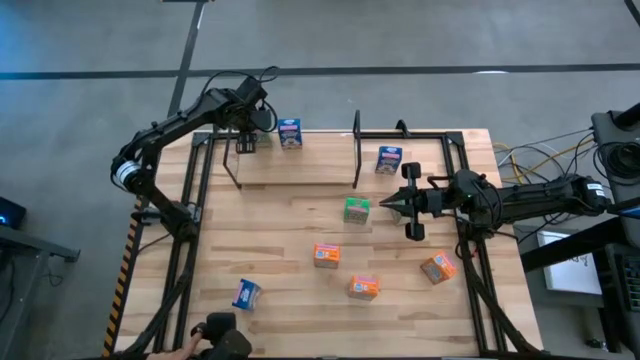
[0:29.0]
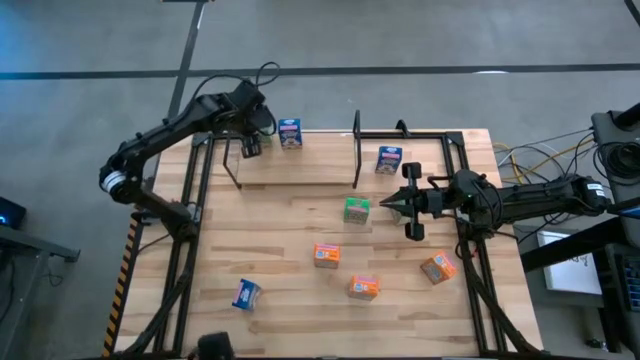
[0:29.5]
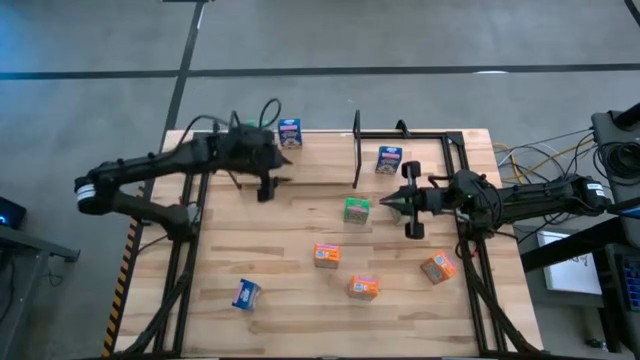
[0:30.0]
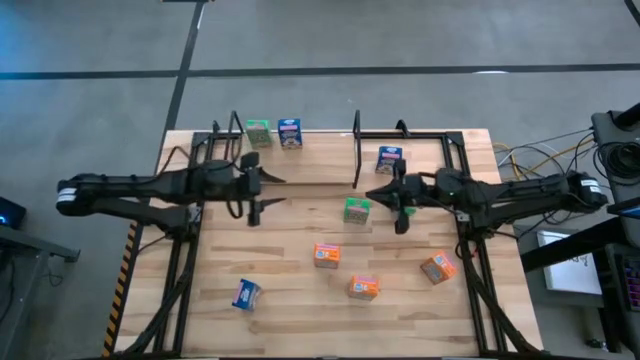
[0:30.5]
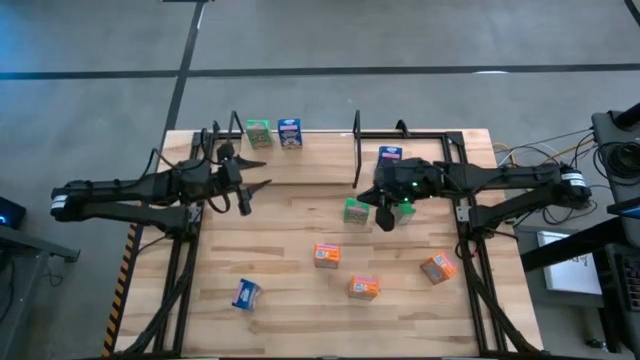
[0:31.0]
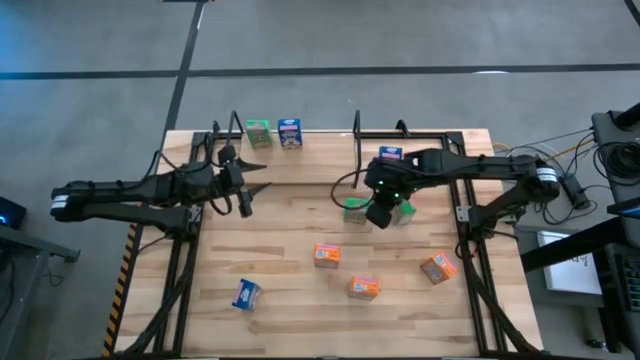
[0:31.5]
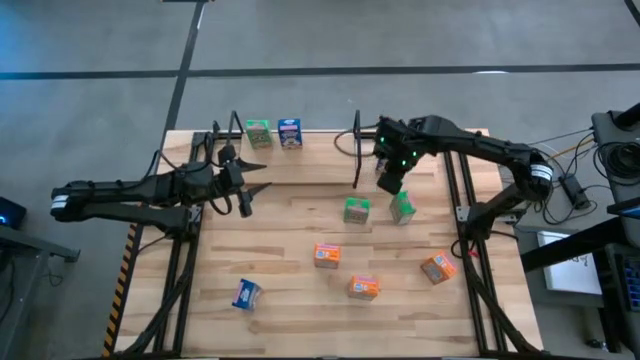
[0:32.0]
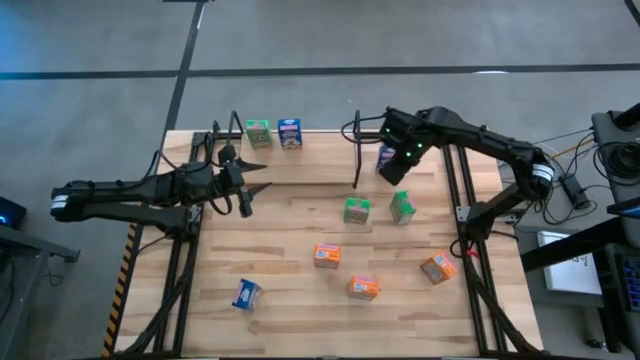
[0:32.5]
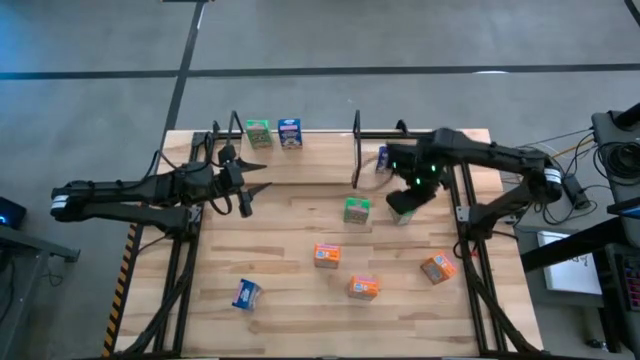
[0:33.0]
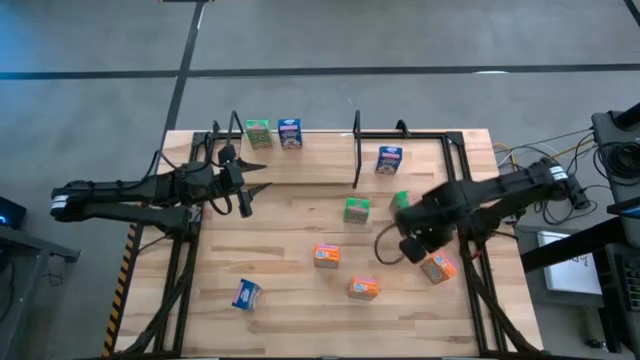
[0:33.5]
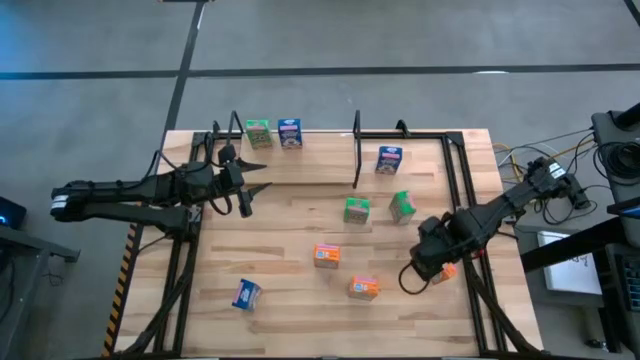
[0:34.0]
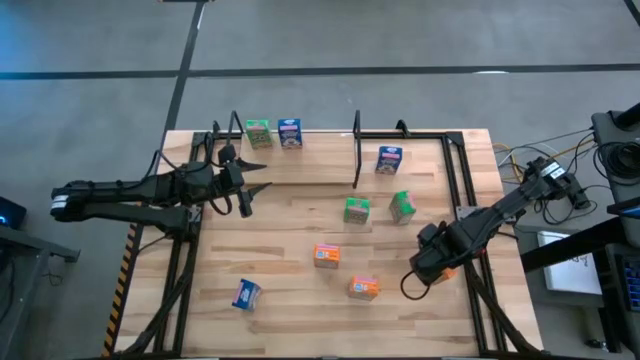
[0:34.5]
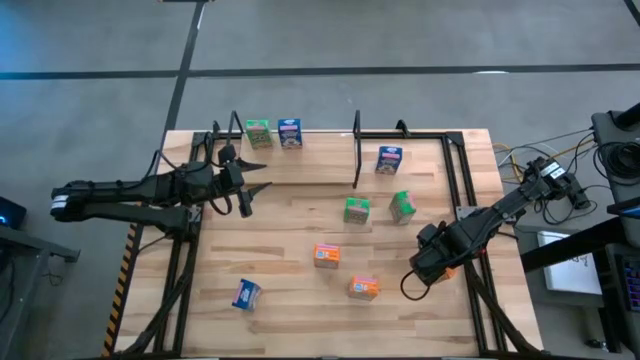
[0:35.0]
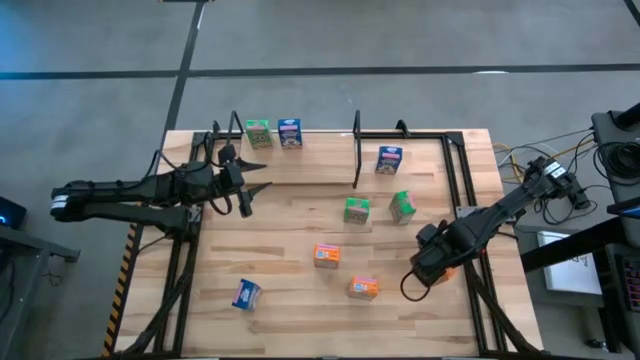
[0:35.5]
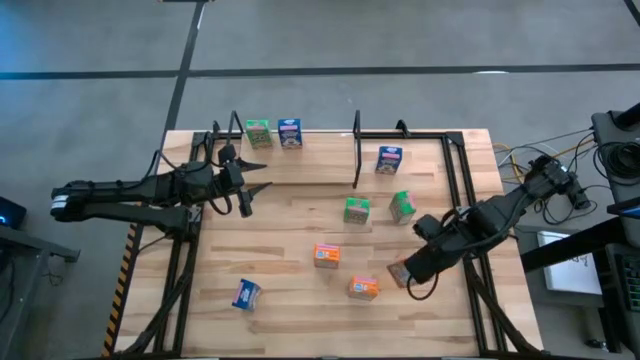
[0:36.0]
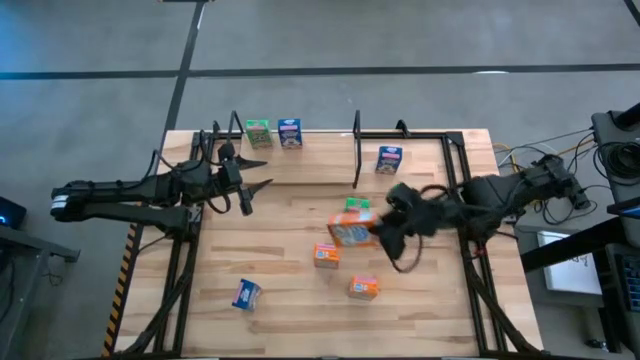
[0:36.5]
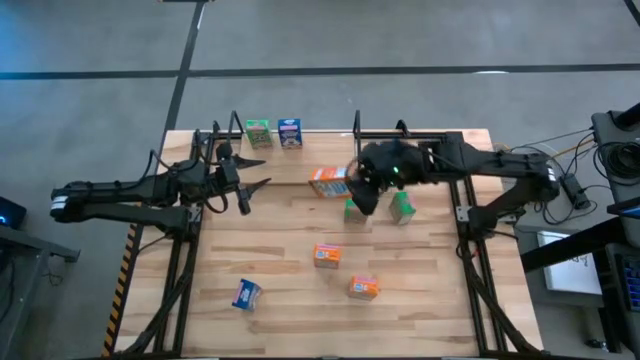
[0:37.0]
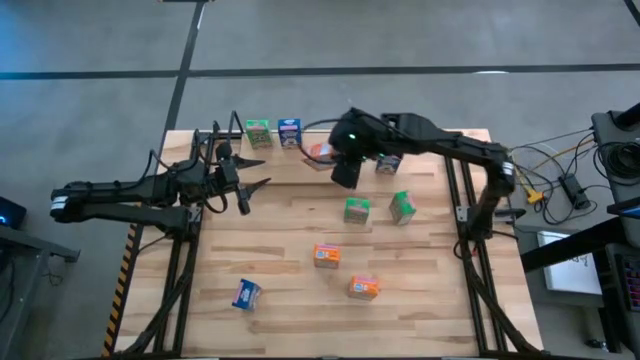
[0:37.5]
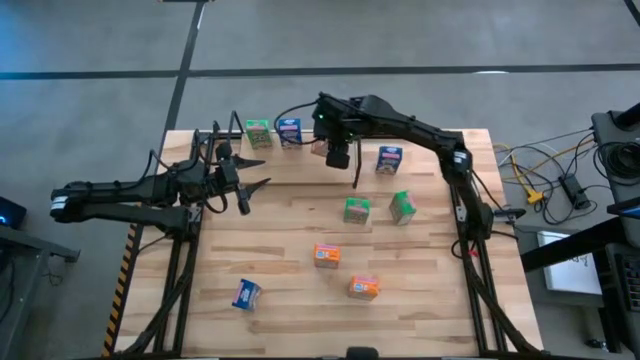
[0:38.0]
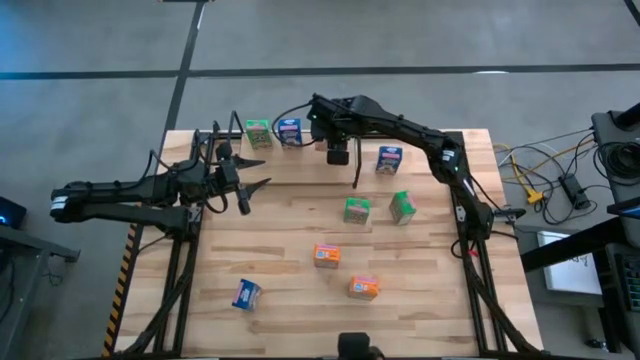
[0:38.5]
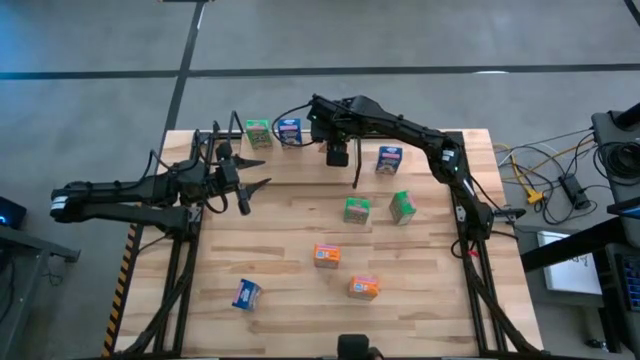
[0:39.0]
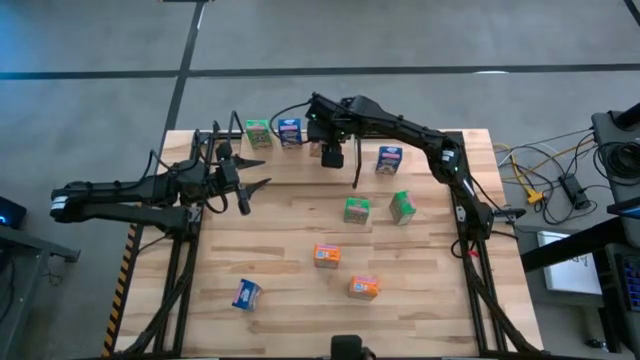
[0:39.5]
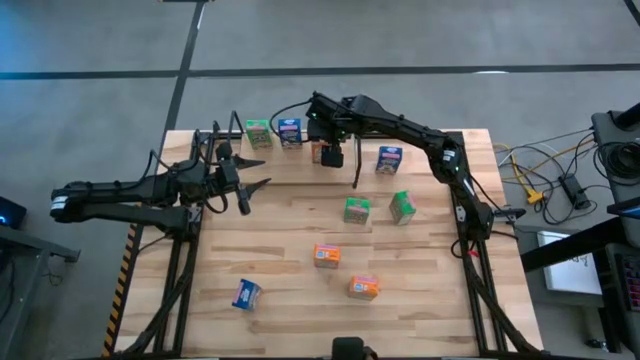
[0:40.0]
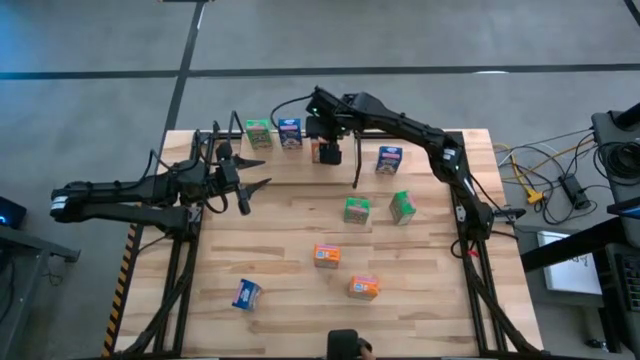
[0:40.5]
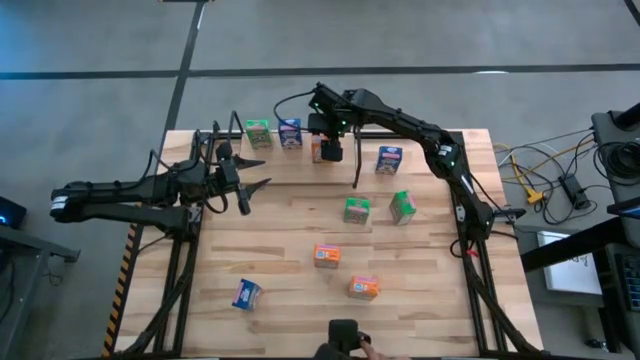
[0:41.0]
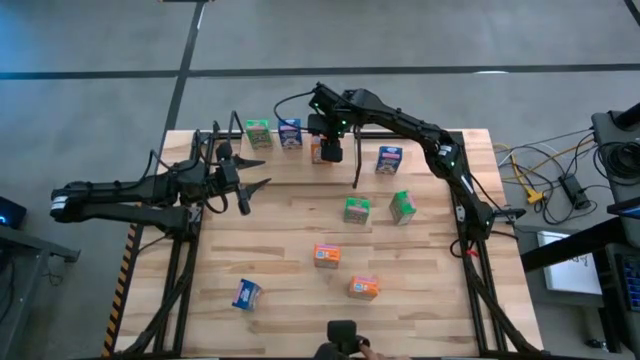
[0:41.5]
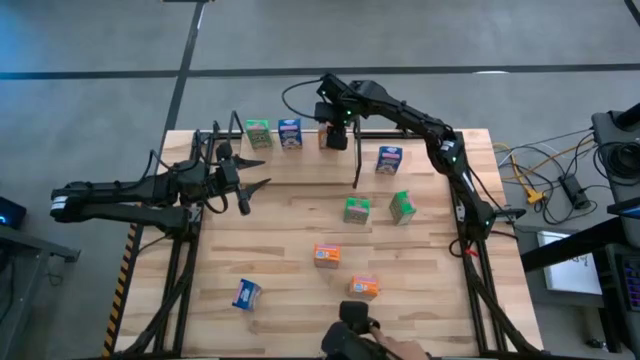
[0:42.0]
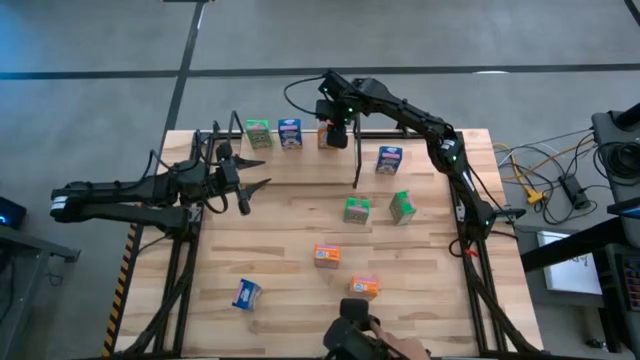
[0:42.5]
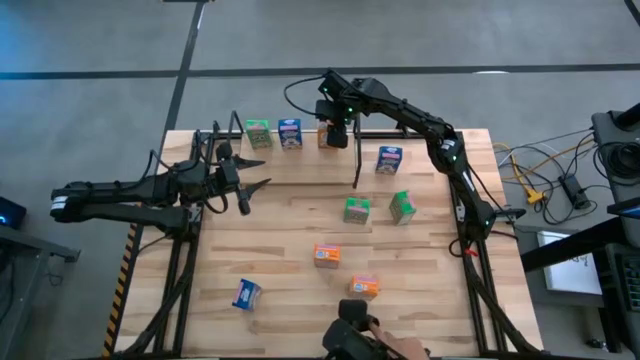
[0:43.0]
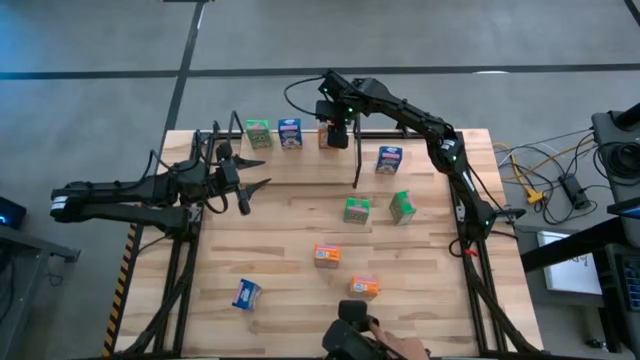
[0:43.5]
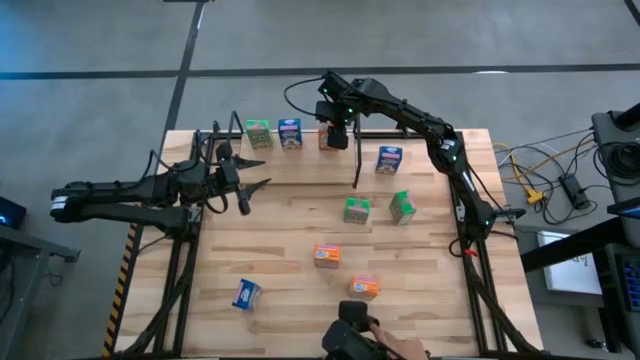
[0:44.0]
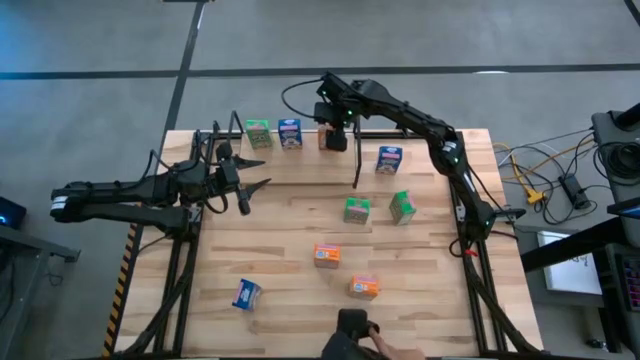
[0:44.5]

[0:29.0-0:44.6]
Task: Stack cereal on shelf
Put the top right orange cereal box on the shelf

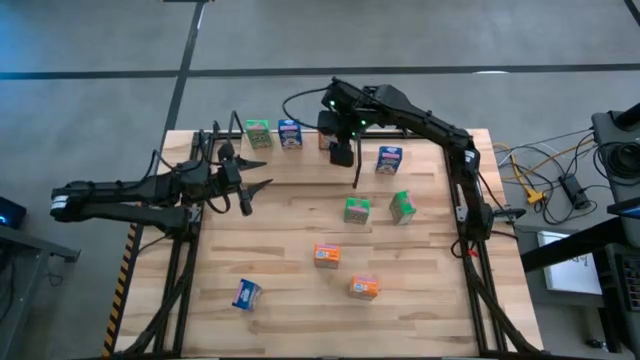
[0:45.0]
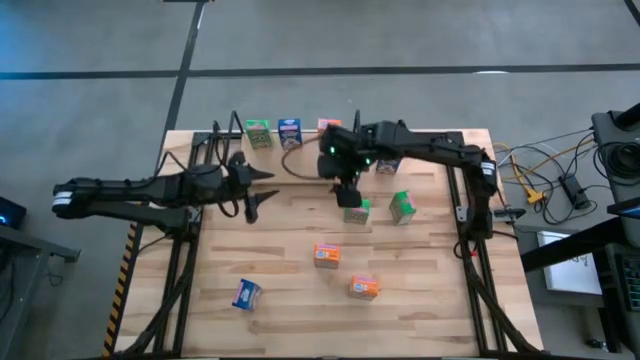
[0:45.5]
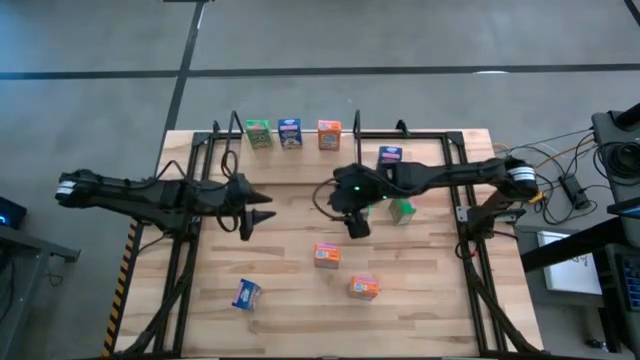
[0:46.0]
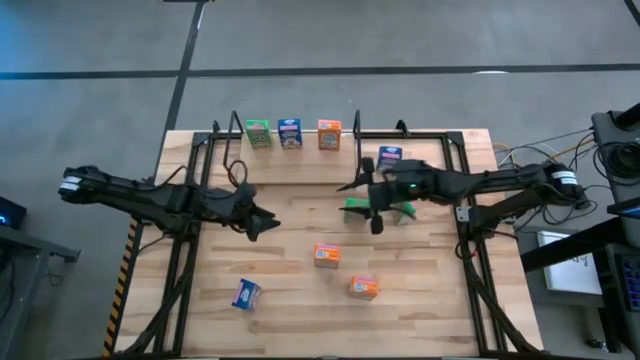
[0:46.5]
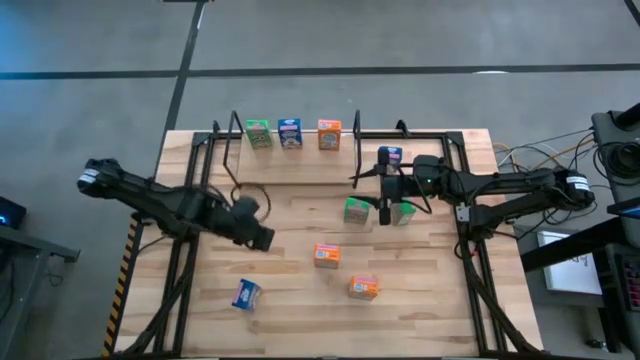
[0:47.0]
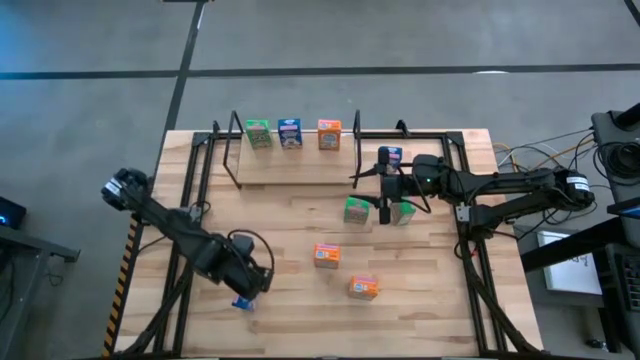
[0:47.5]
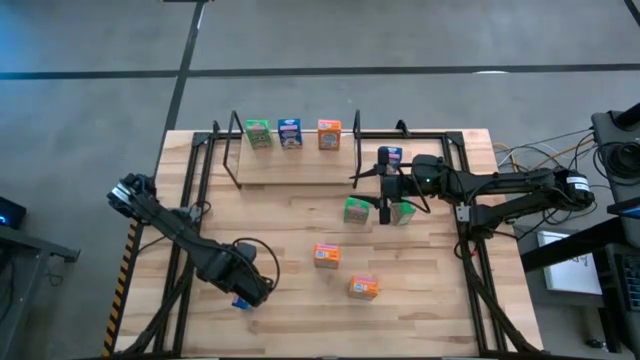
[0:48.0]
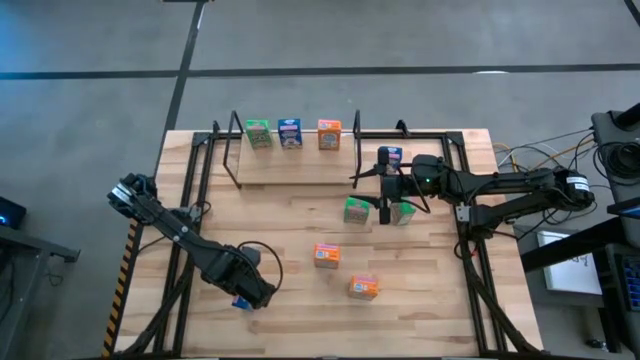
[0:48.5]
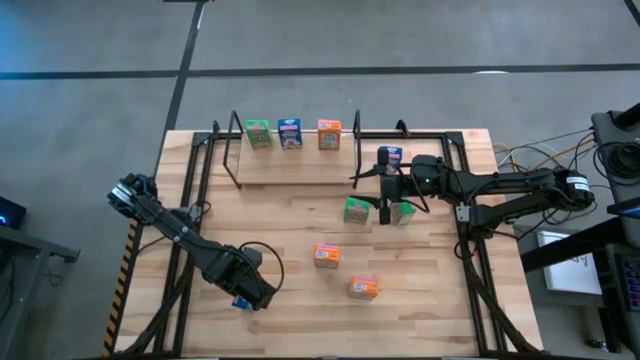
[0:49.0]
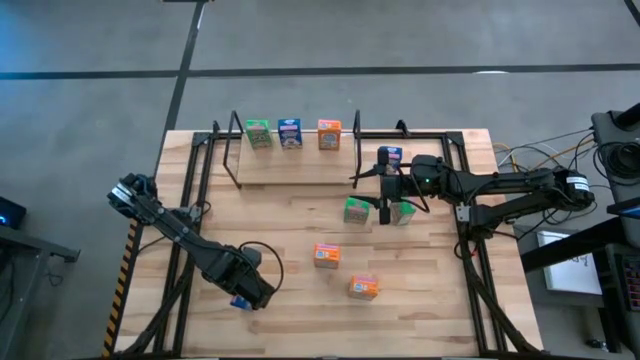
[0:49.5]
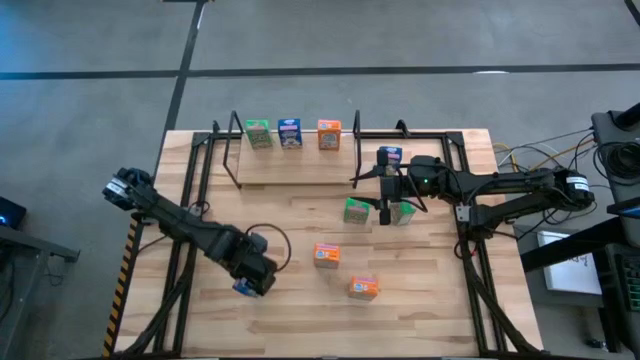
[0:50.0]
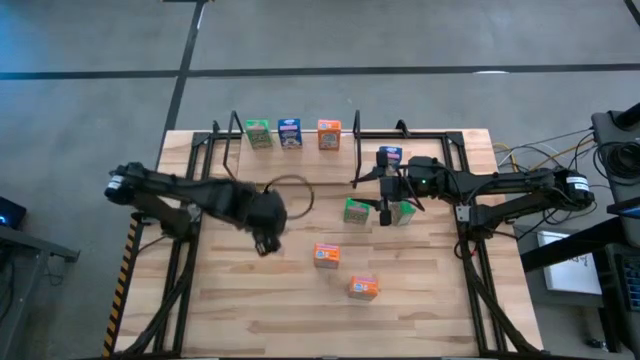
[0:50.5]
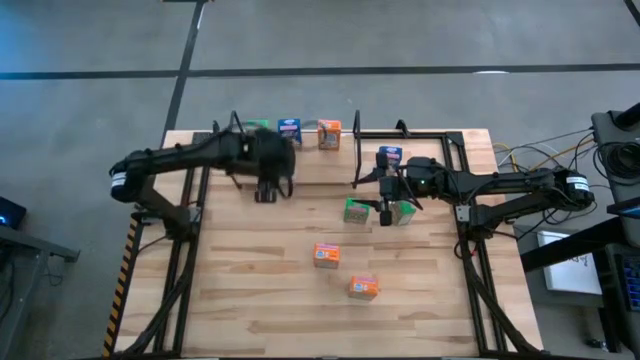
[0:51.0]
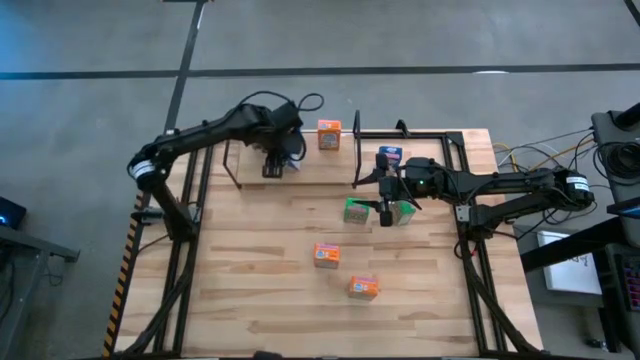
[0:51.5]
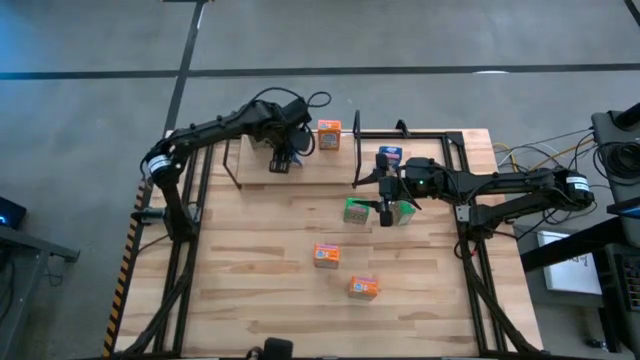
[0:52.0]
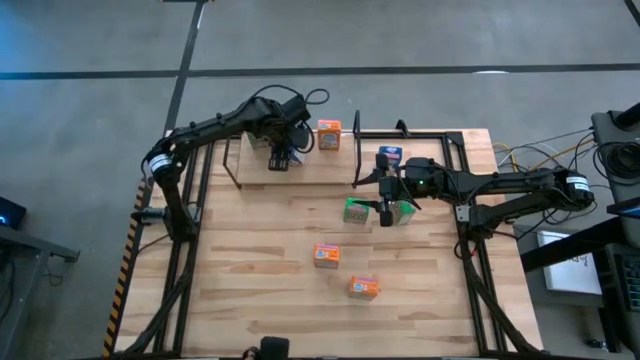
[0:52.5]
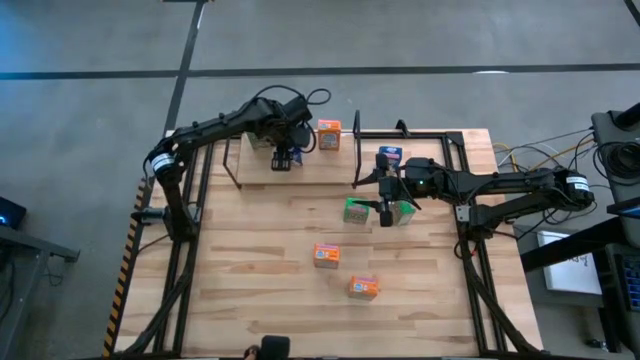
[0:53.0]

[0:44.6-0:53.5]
Put the bottom blue cereal box on the shelf aligned with the other blue cereal box
